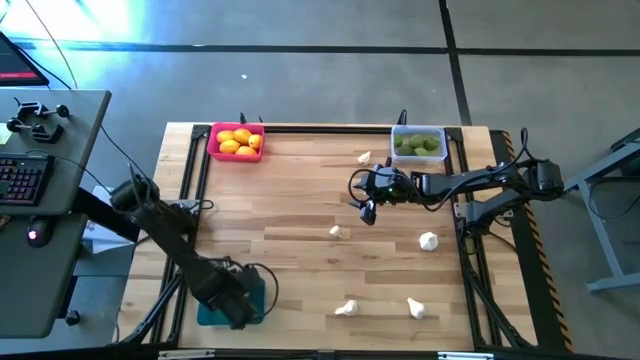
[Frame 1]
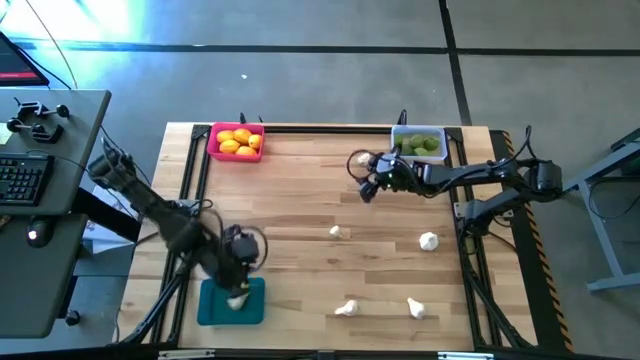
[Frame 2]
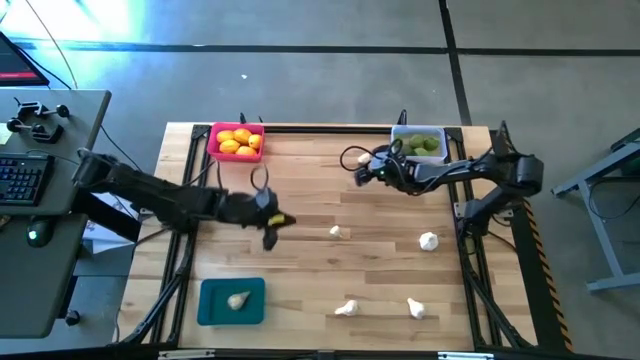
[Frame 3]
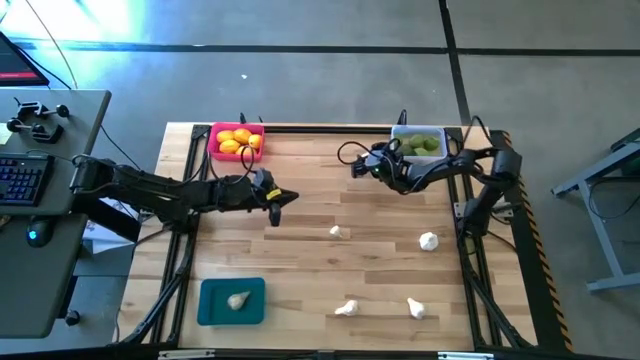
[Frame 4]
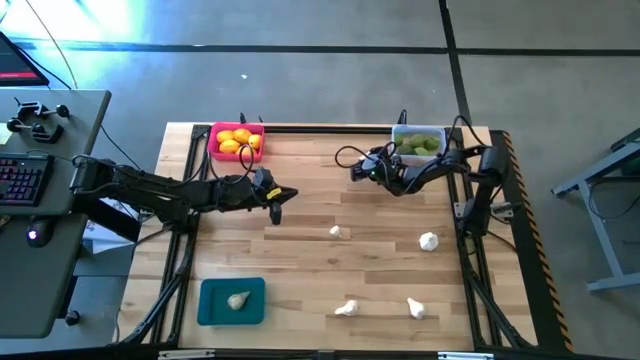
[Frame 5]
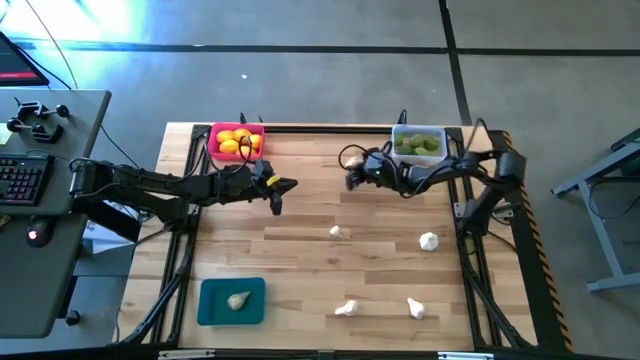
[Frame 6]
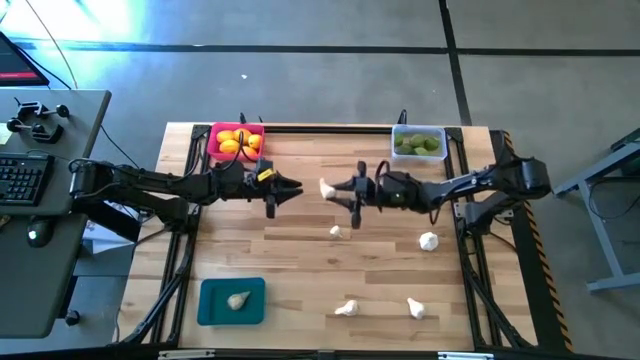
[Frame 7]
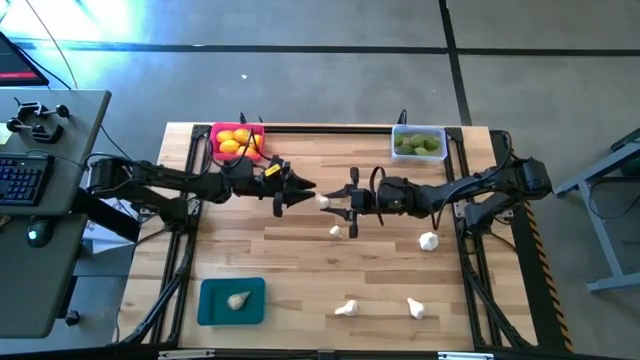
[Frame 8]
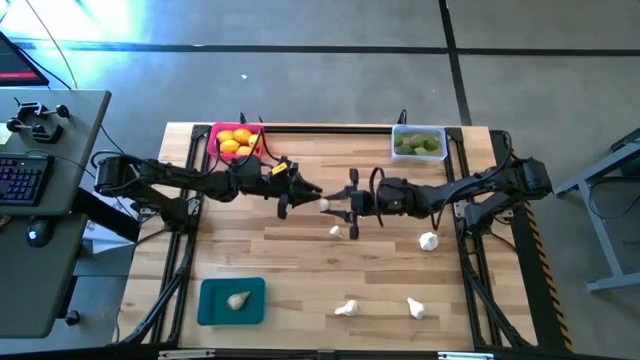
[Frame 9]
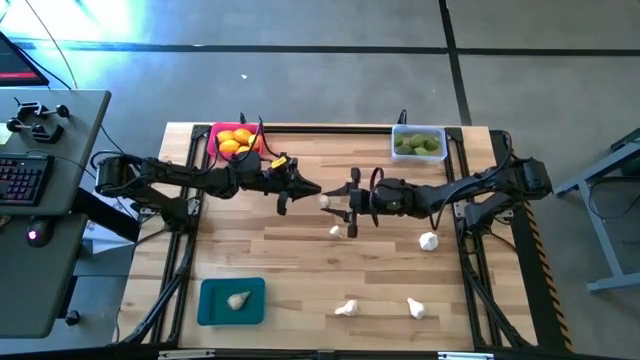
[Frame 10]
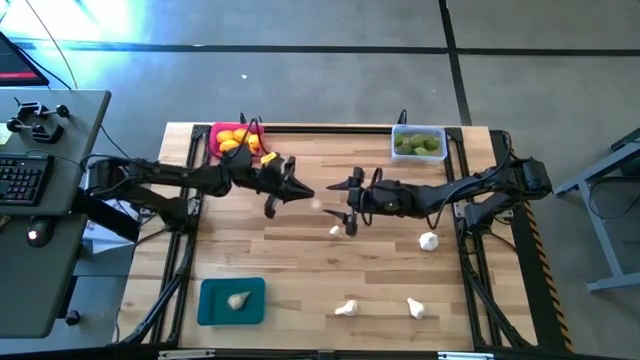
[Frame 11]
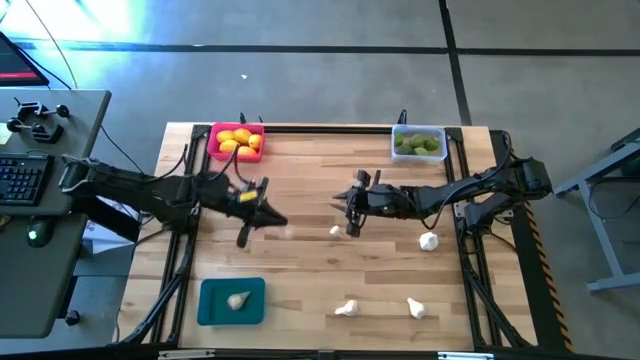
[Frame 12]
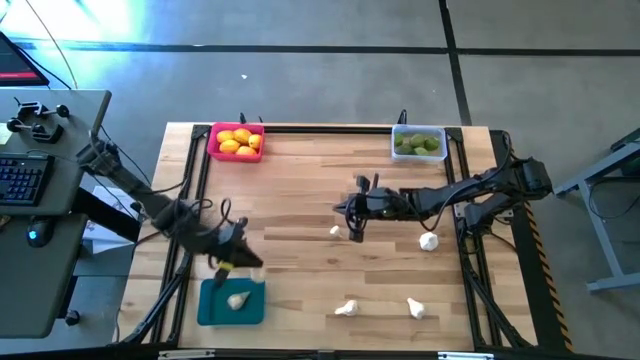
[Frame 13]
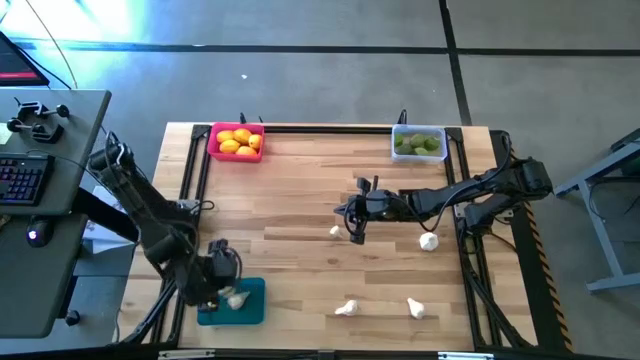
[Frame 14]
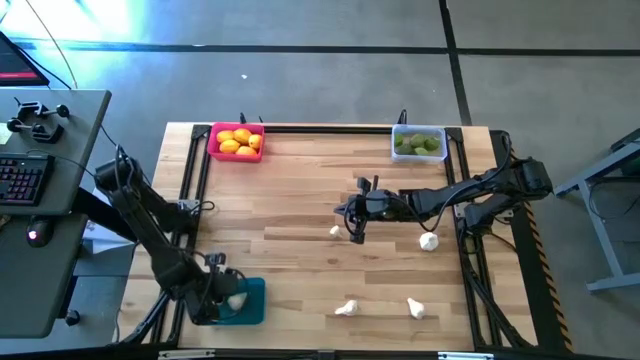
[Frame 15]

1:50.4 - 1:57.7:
Task: Sort produce into baskets
Put the top center garlic into the blue bin

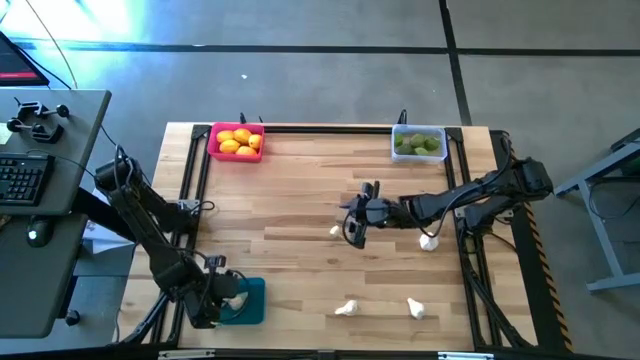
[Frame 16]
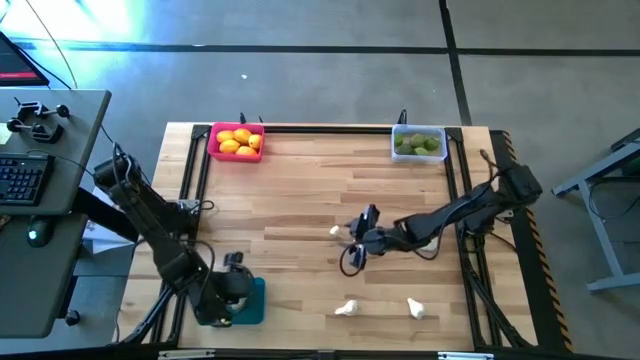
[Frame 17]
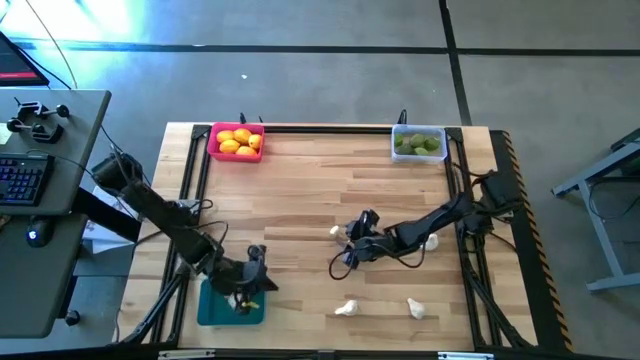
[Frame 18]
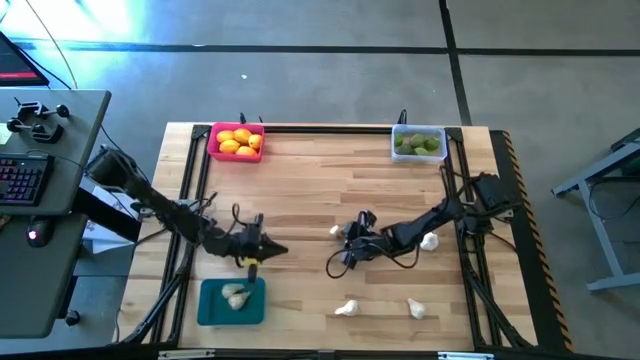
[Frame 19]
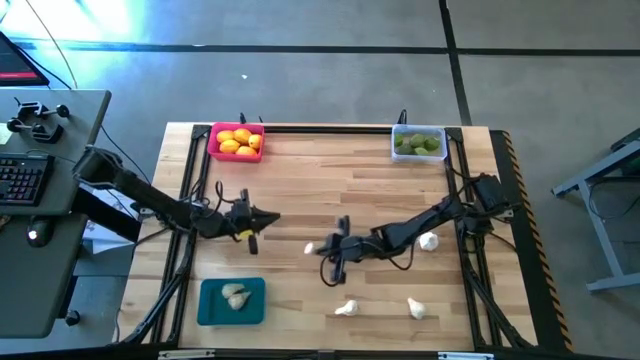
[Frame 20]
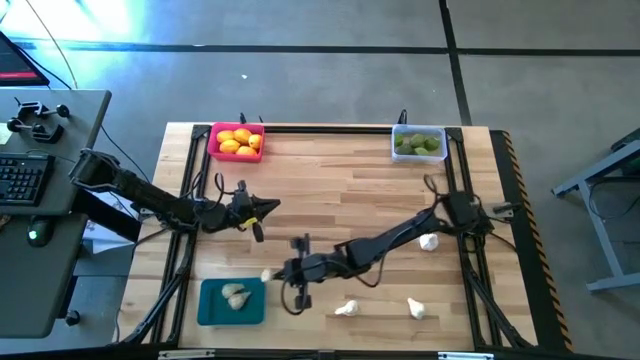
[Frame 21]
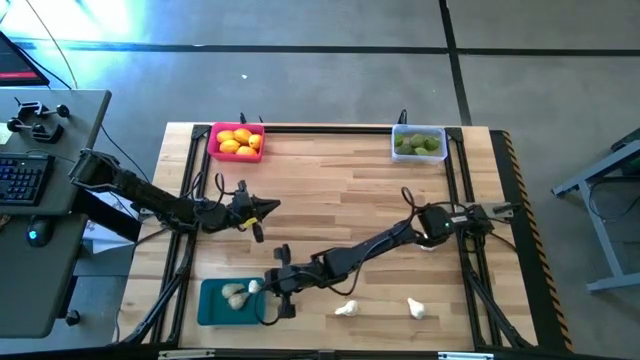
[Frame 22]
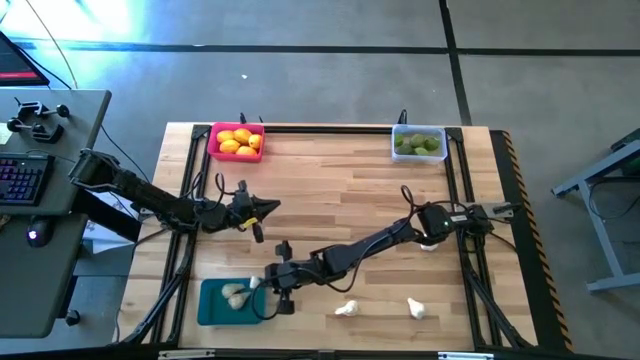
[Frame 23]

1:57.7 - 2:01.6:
Put the center garlic into the blue bin

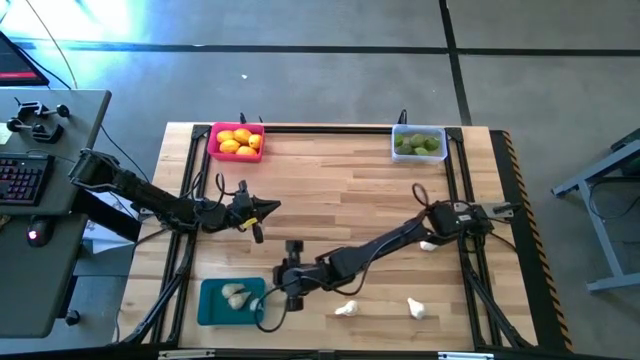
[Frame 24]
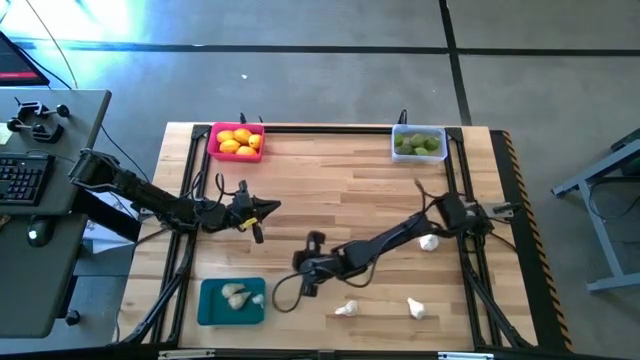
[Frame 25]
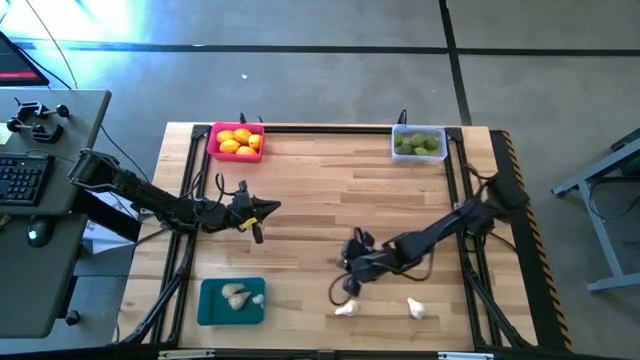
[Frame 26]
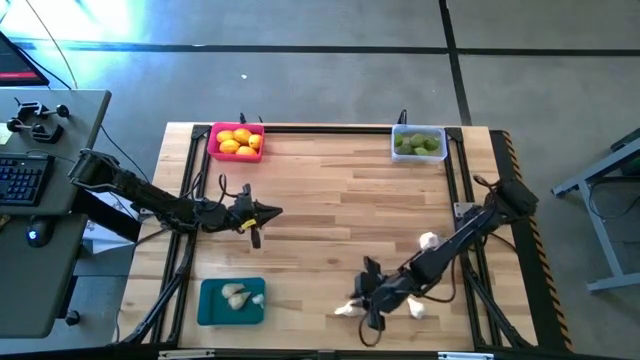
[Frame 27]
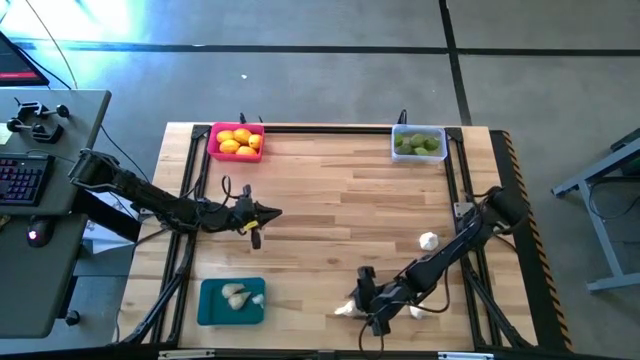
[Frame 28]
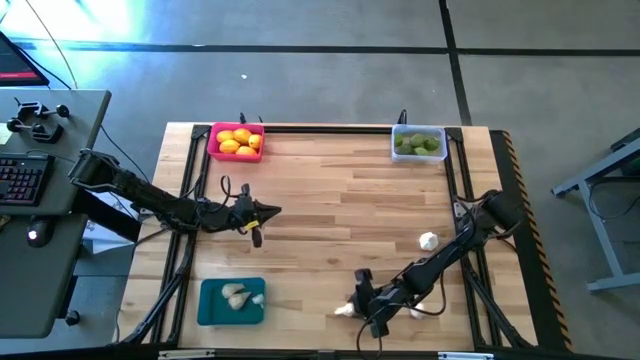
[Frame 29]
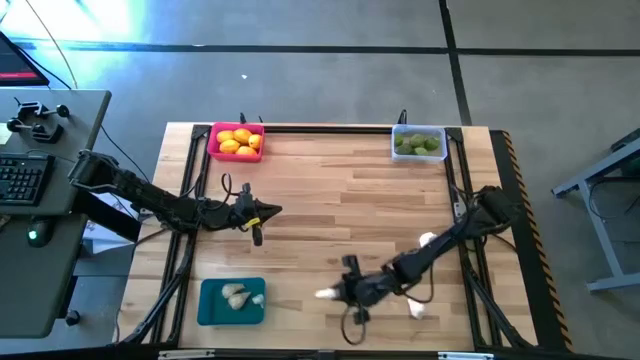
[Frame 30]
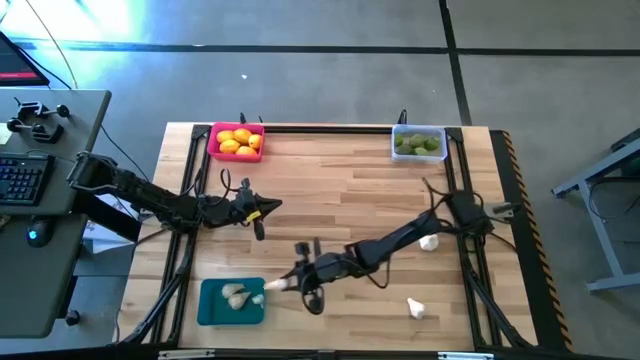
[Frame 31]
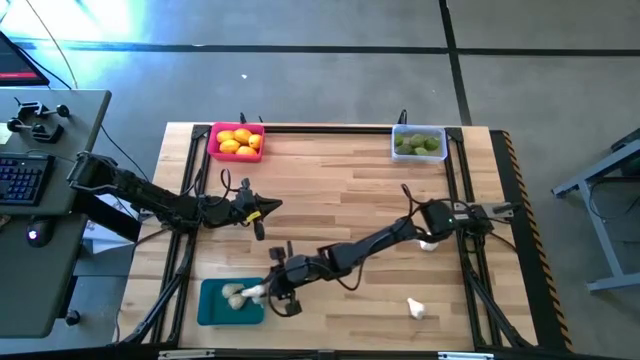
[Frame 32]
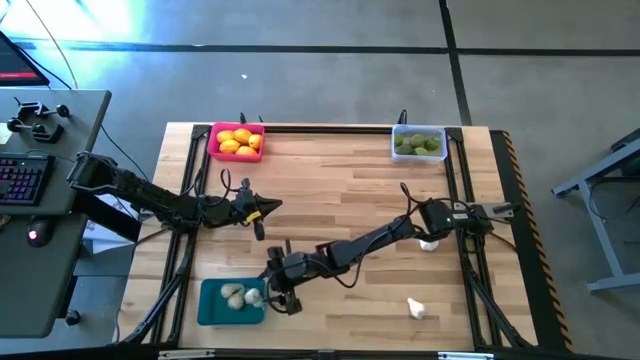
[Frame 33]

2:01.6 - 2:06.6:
Put the bottom center garlic into the blue bin

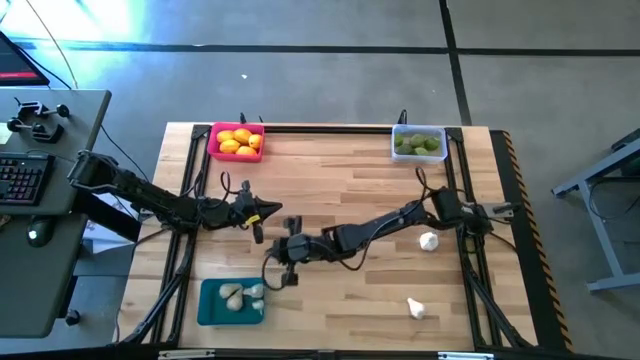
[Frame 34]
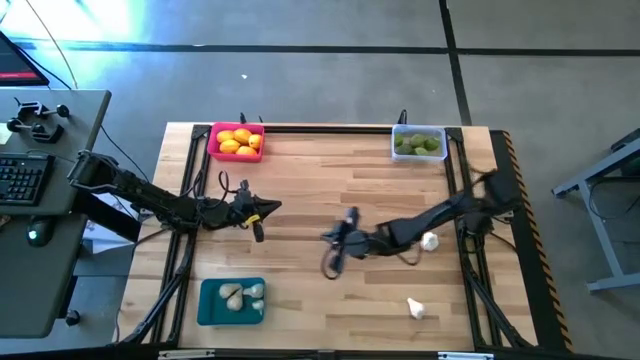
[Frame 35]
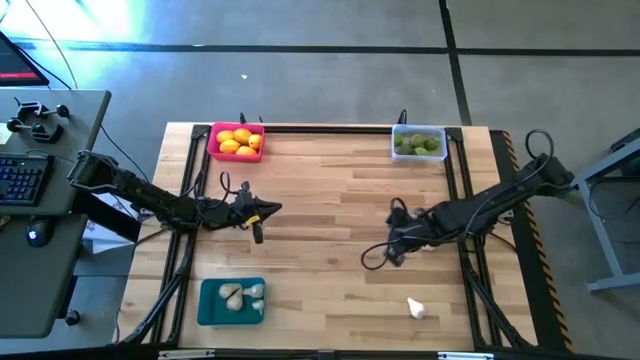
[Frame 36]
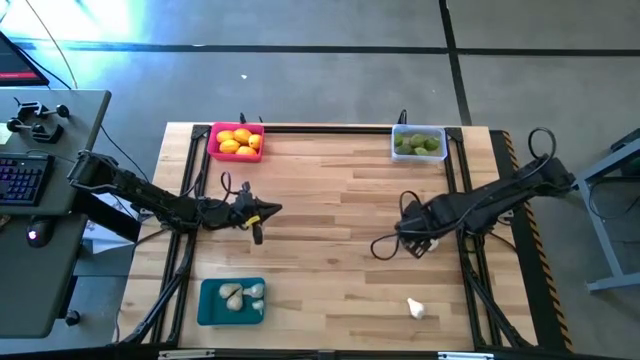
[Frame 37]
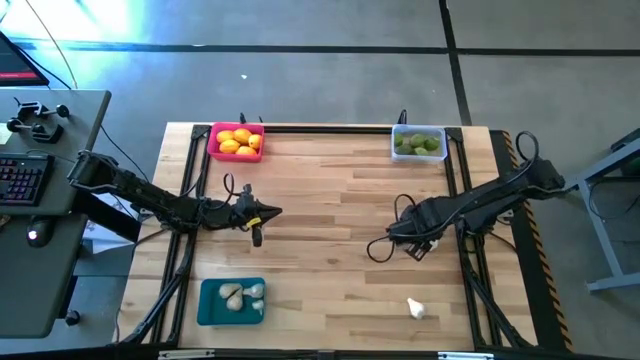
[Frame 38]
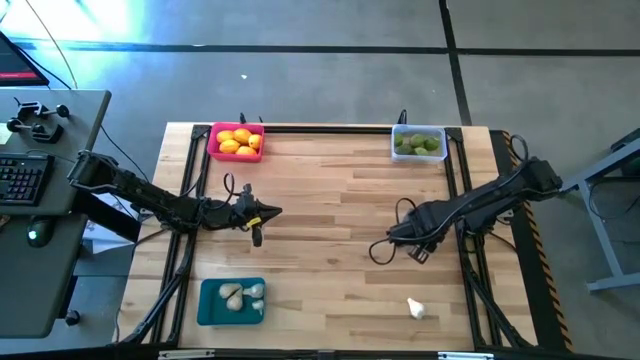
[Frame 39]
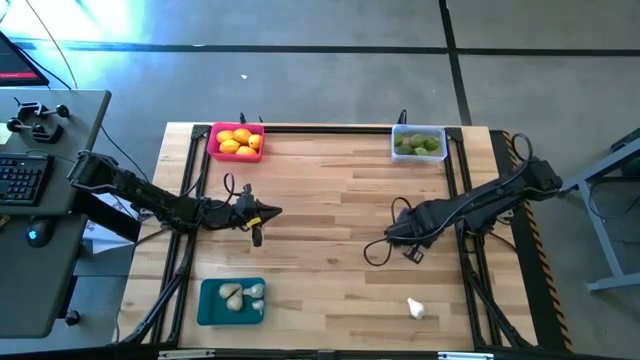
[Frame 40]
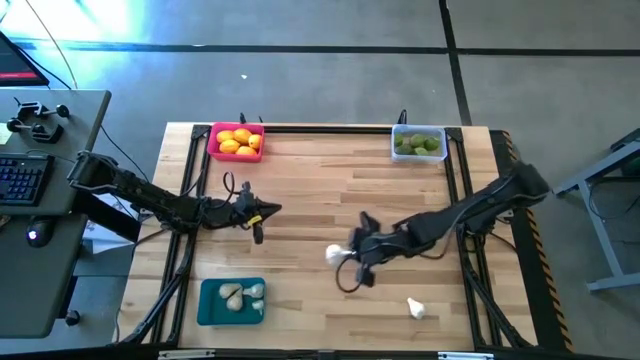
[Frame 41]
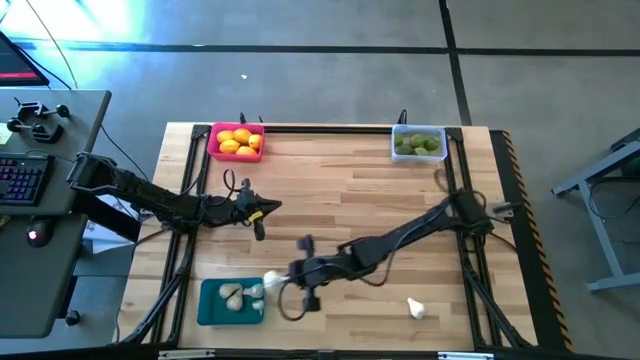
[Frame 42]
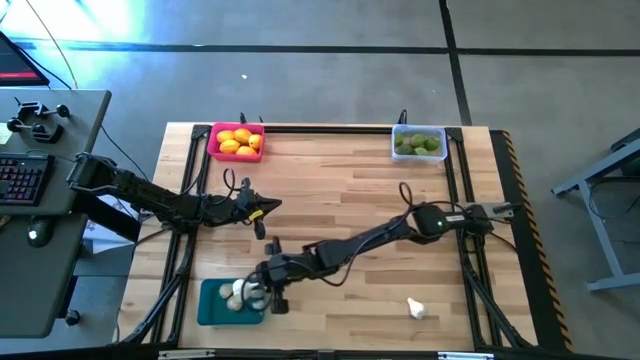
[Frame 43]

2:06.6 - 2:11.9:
Put the top garlic into the blue bin
